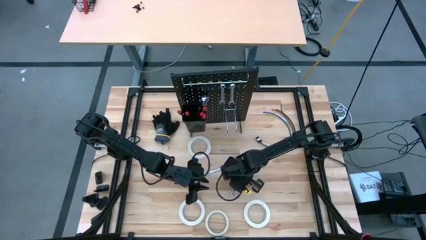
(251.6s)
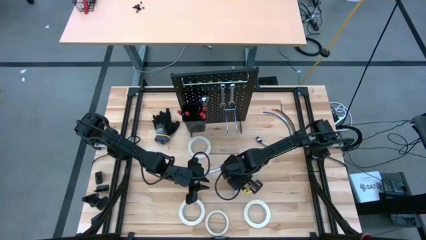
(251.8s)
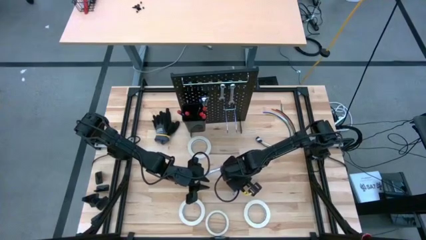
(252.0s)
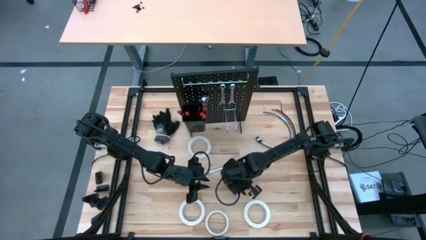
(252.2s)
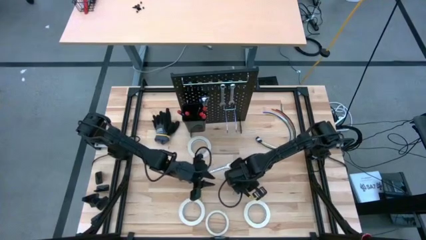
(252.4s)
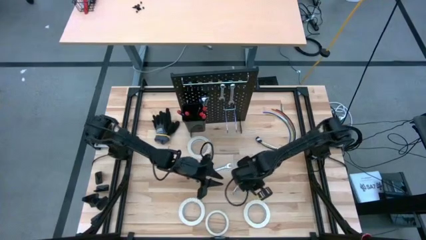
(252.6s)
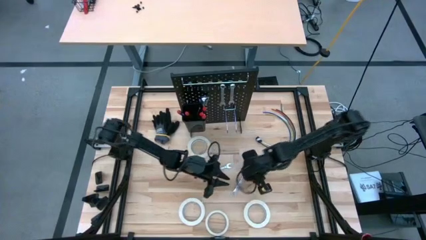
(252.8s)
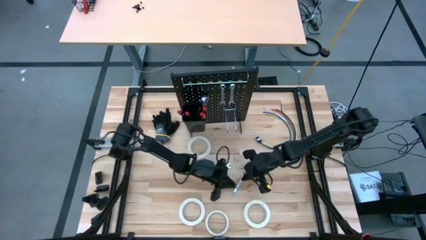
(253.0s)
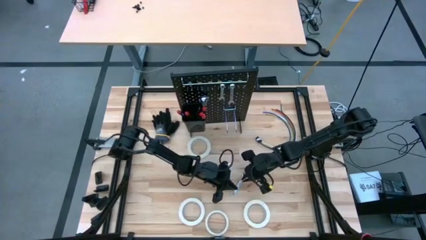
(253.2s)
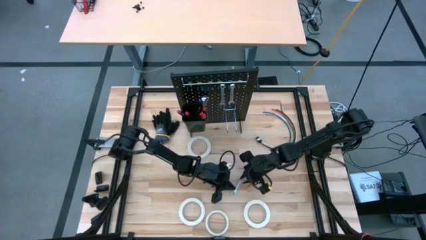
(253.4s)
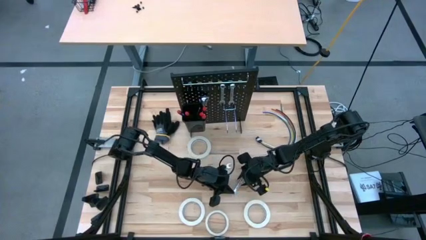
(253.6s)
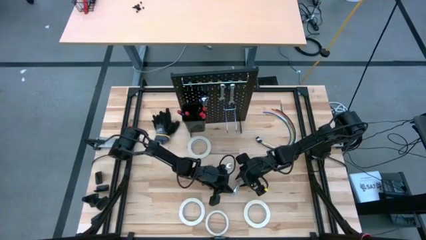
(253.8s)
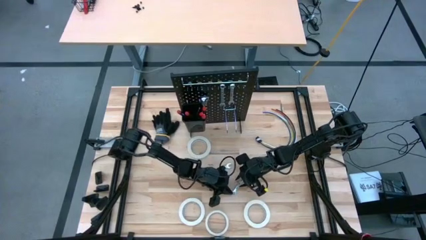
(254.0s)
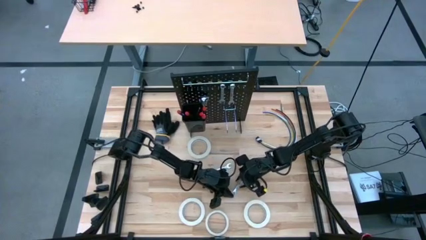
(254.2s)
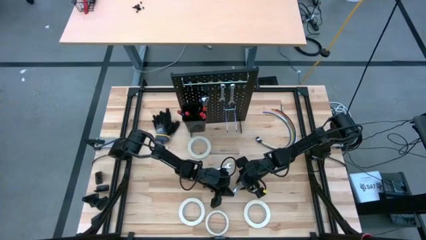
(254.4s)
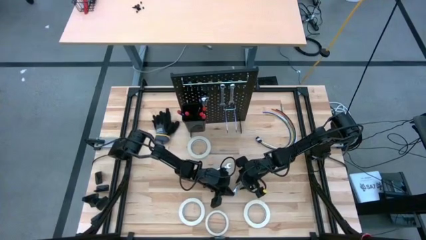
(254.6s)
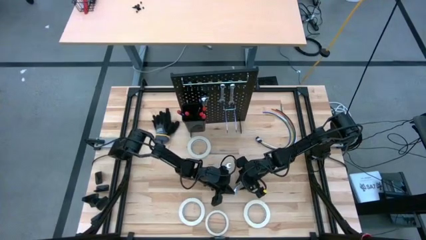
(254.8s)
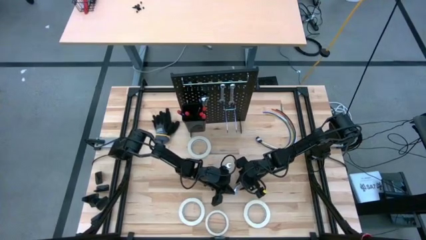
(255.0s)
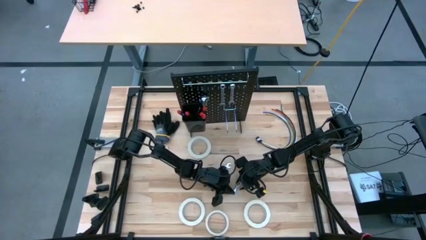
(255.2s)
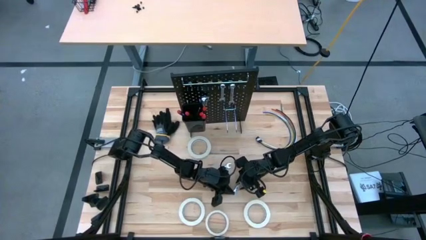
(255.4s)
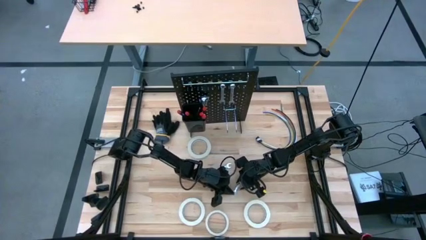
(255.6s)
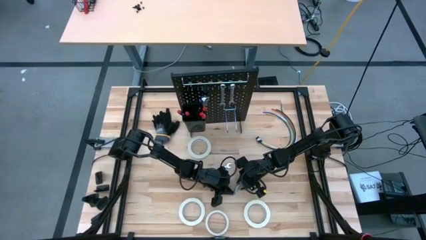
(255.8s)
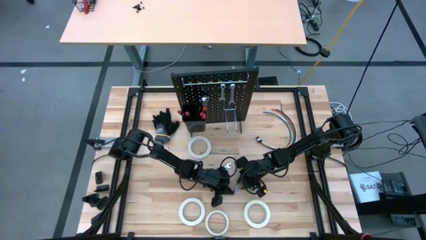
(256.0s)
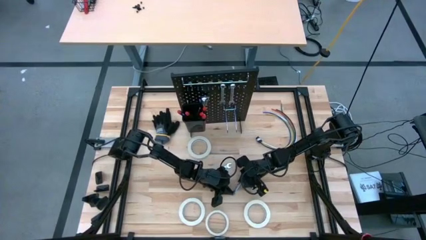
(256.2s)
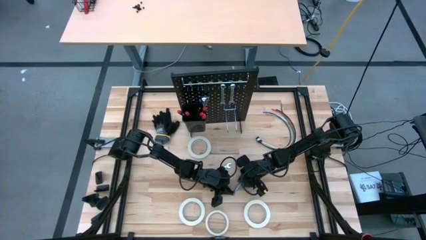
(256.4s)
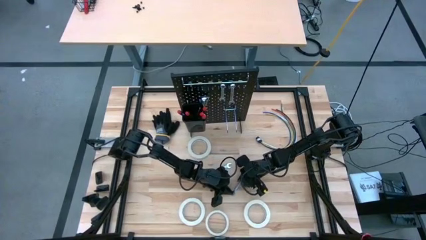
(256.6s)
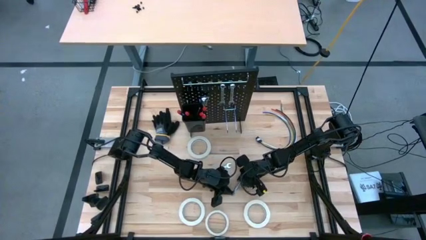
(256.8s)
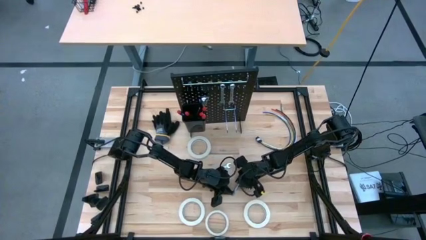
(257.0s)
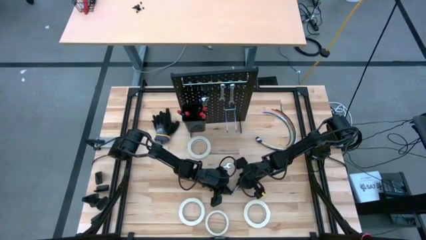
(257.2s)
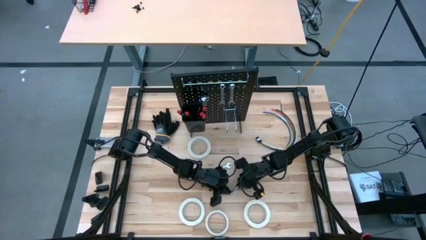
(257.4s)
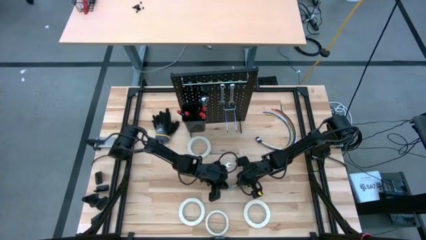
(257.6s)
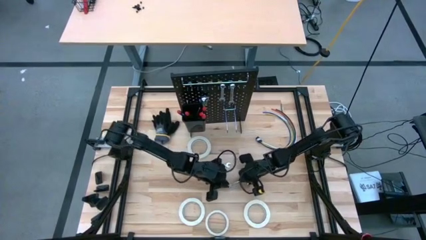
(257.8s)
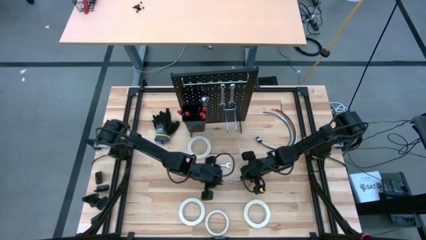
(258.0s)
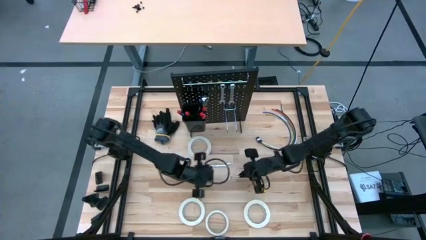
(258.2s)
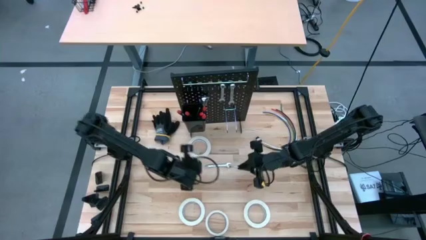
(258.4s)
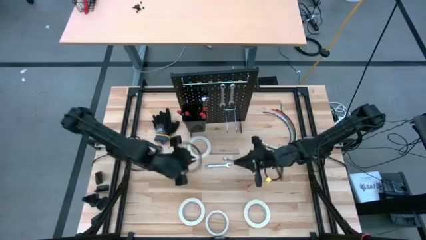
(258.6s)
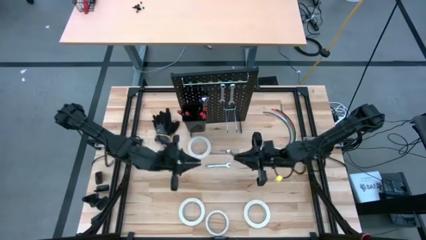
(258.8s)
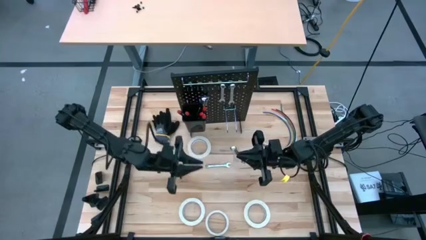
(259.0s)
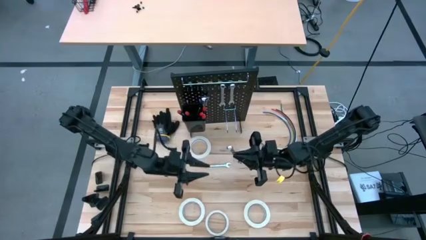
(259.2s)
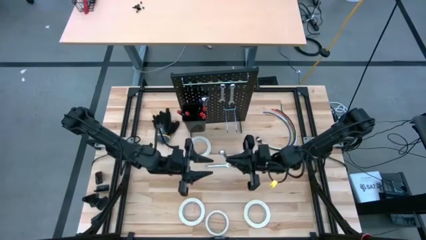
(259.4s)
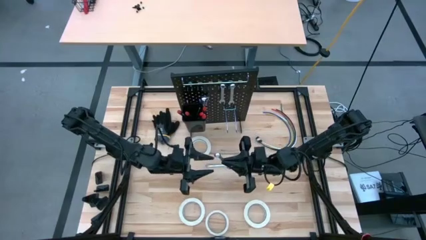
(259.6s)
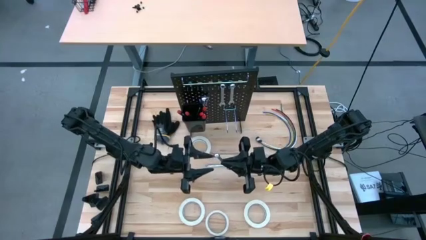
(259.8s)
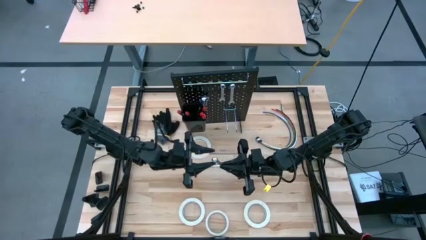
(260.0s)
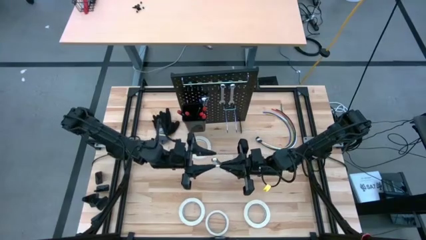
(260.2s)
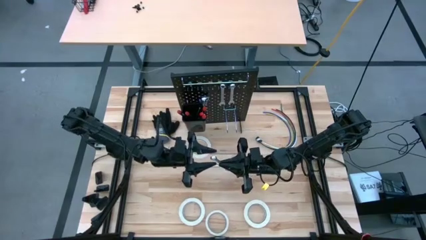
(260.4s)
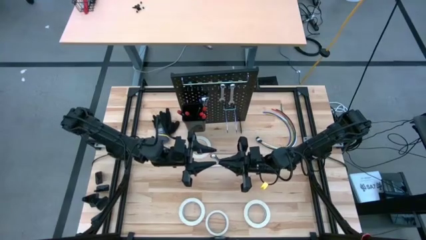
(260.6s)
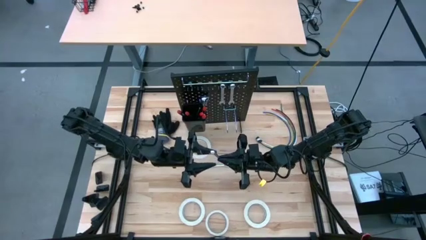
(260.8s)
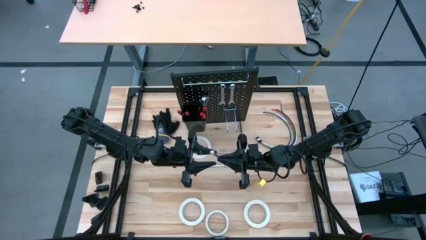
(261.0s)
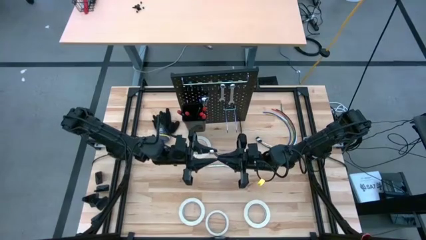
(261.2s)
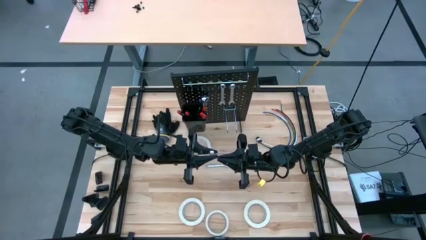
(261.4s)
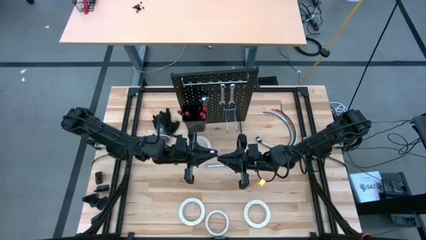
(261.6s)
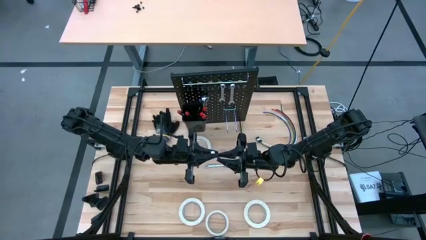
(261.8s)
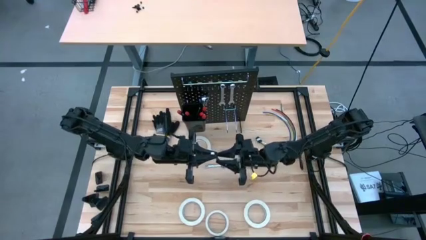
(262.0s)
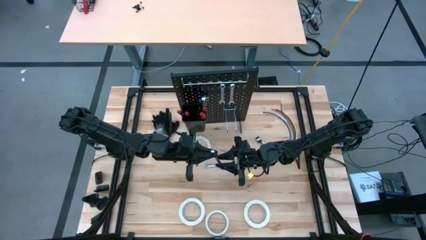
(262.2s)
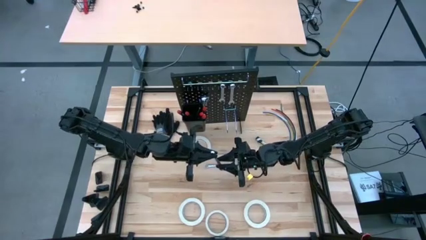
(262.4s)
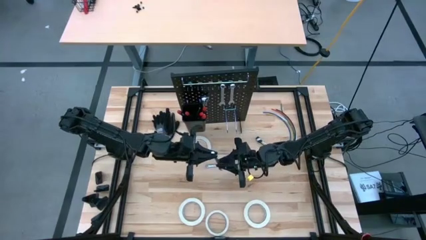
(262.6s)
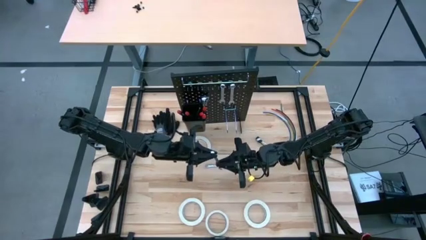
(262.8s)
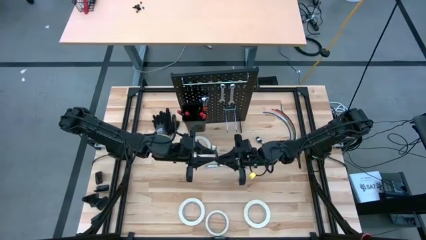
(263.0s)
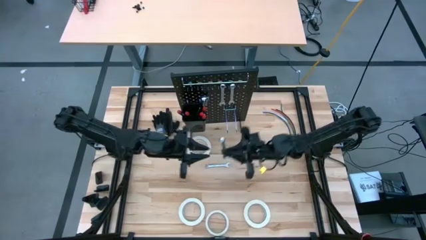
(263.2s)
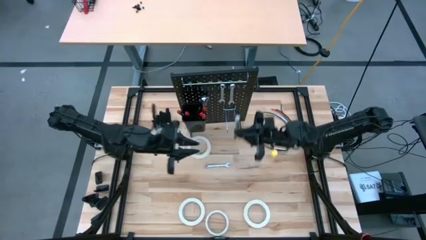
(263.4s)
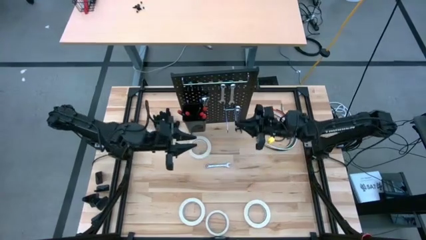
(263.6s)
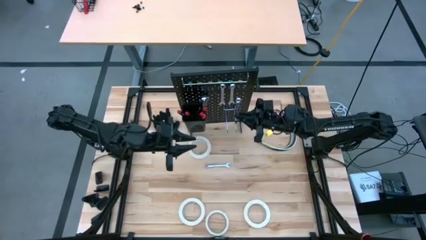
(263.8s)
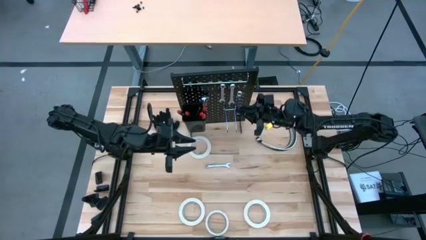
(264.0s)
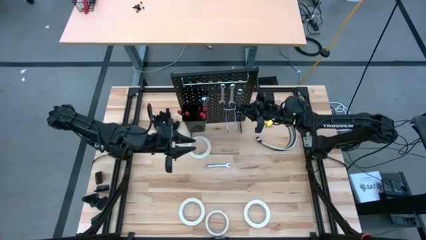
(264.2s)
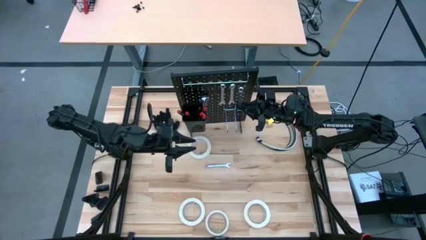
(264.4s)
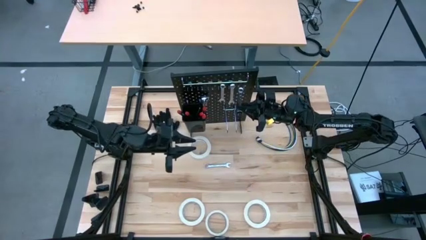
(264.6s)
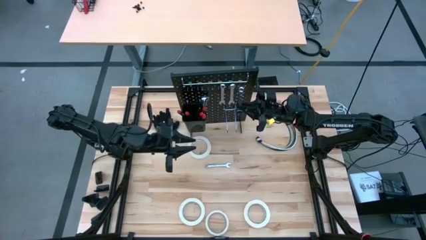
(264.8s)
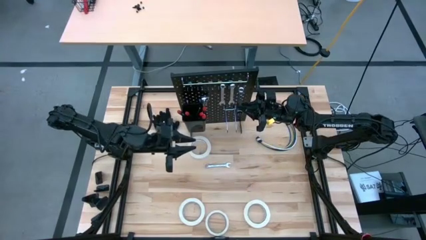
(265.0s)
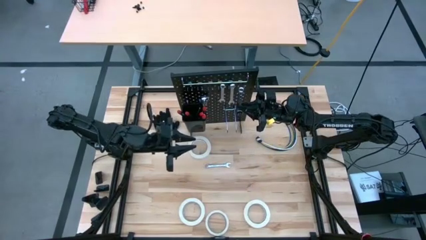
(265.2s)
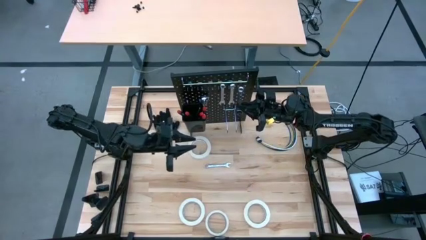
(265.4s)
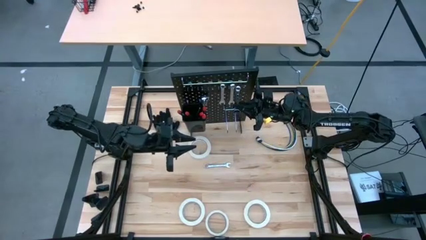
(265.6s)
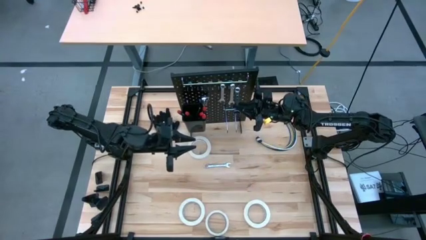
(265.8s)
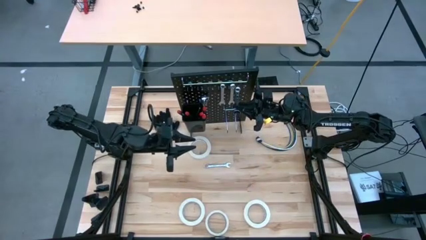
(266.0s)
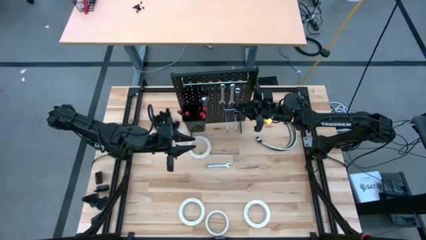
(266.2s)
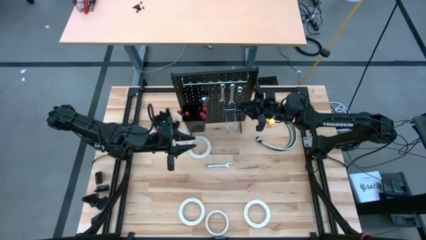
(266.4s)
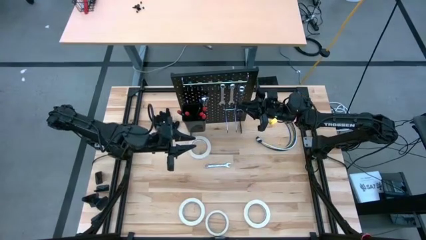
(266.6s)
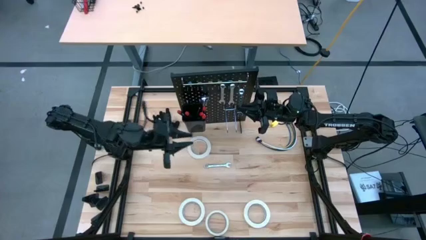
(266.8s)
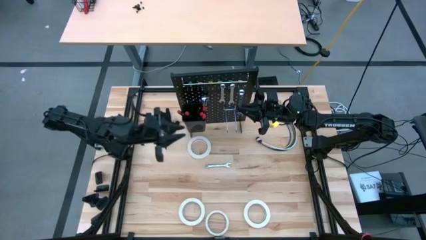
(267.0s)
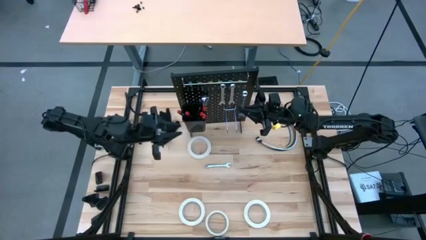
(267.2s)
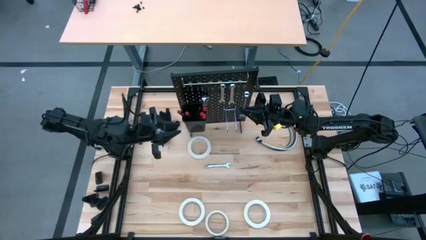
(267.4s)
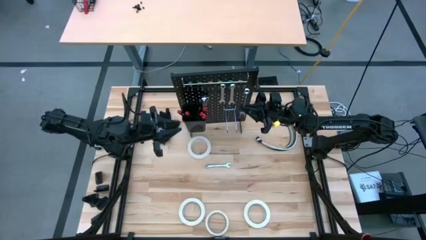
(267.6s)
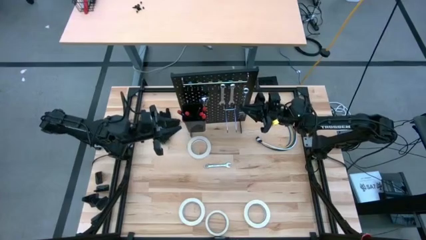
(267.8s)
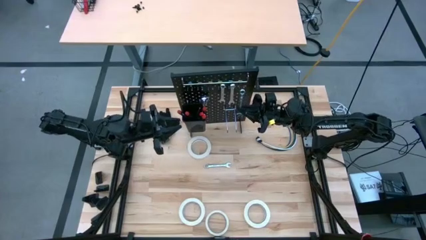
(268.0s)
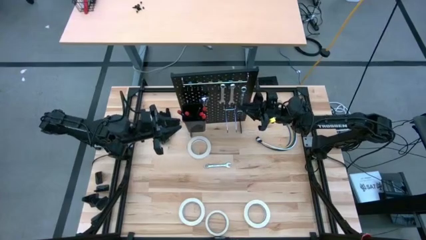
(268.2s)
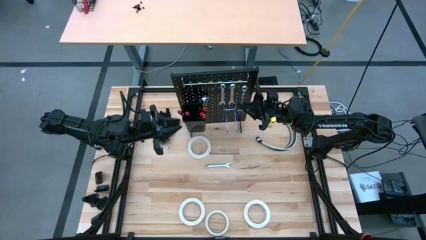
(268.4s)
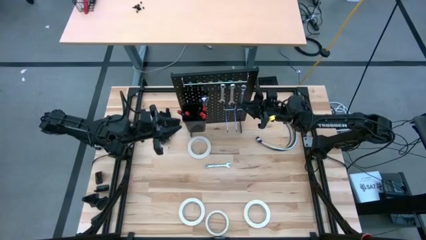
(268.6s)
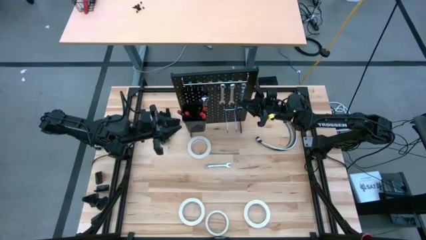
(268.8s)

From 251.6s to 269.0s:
Task: Hang tools onto peg board
Hang the silver wrench on the peg board
